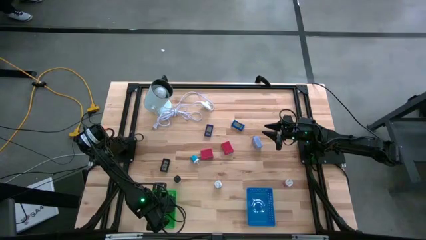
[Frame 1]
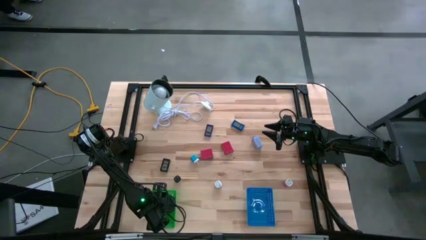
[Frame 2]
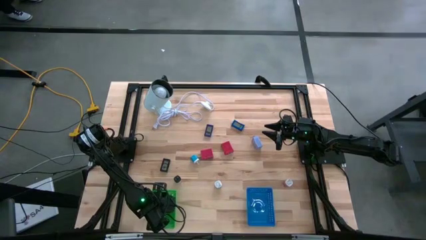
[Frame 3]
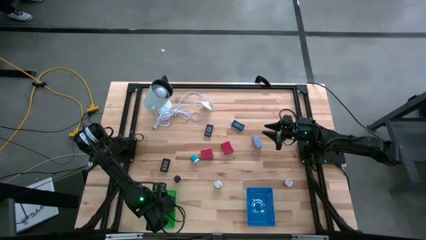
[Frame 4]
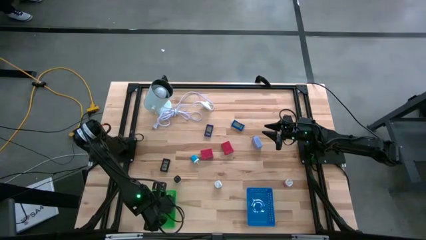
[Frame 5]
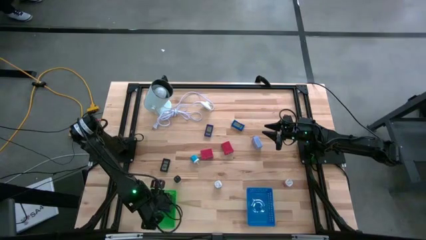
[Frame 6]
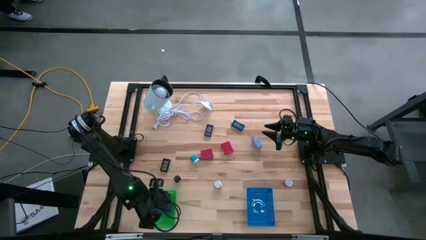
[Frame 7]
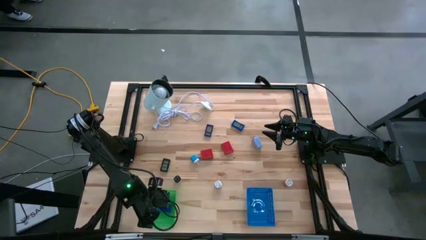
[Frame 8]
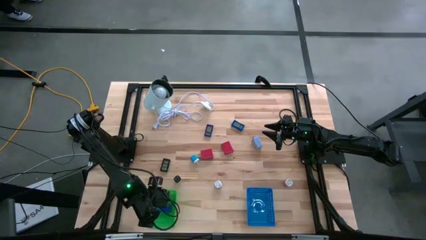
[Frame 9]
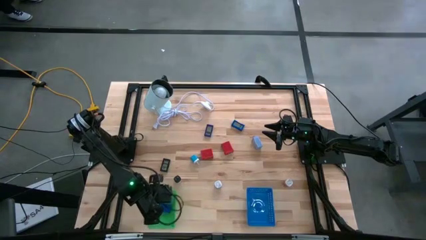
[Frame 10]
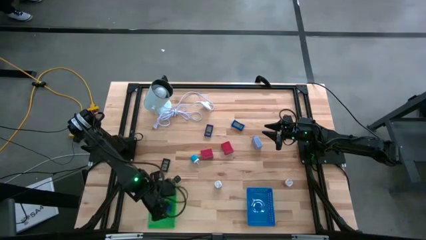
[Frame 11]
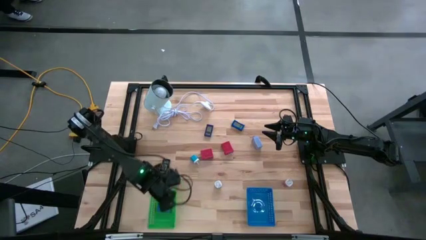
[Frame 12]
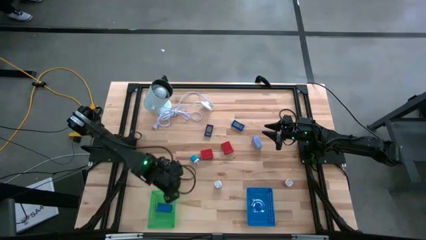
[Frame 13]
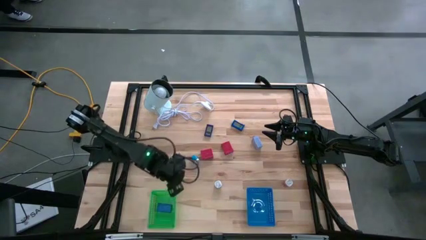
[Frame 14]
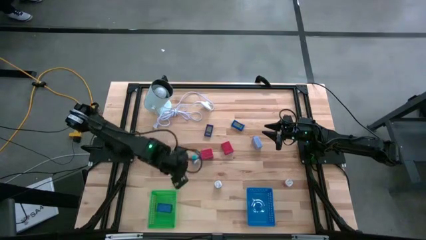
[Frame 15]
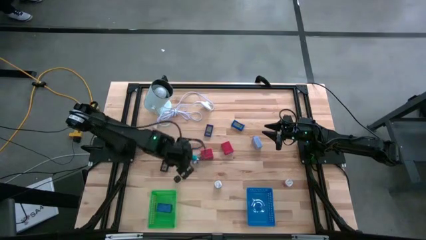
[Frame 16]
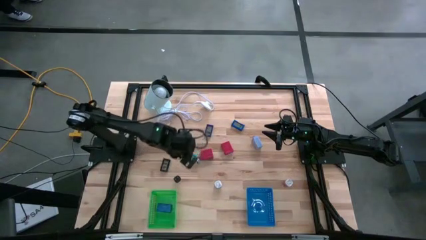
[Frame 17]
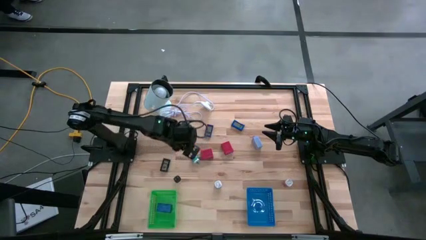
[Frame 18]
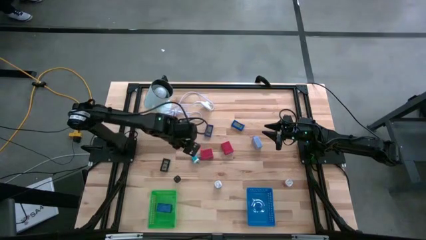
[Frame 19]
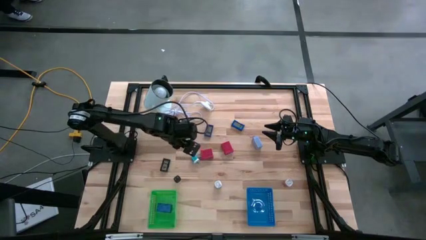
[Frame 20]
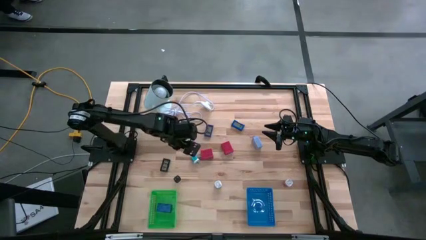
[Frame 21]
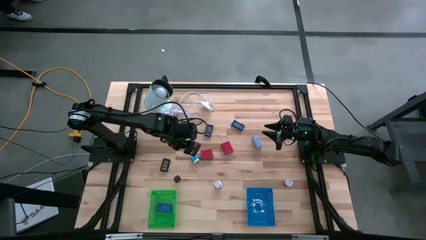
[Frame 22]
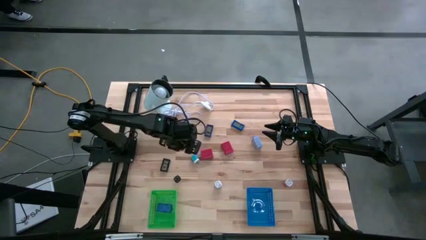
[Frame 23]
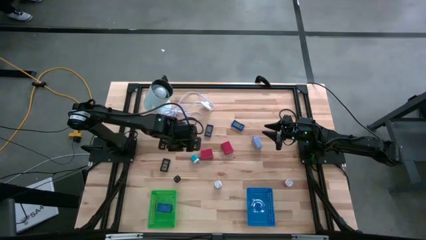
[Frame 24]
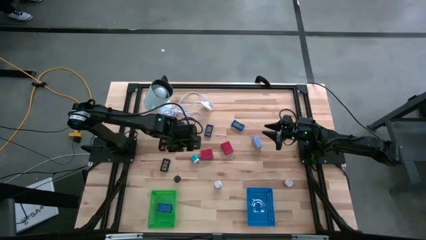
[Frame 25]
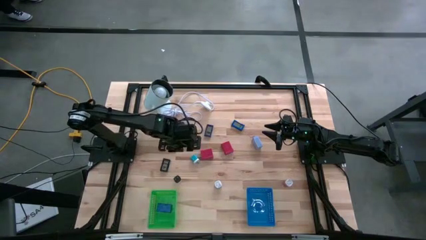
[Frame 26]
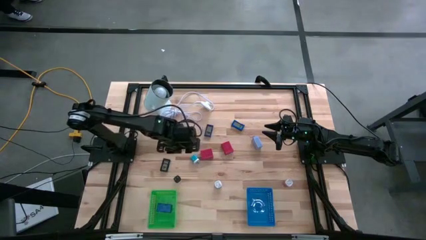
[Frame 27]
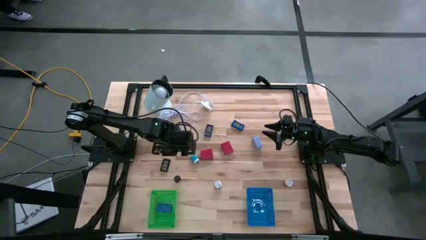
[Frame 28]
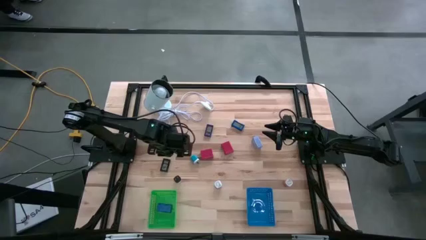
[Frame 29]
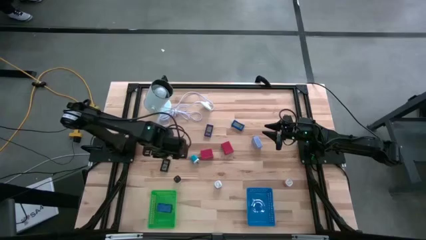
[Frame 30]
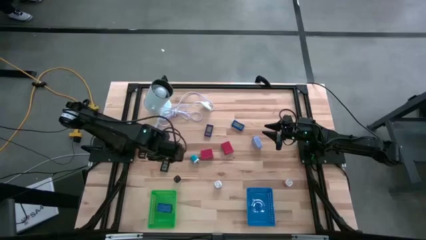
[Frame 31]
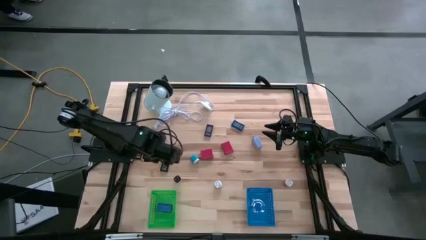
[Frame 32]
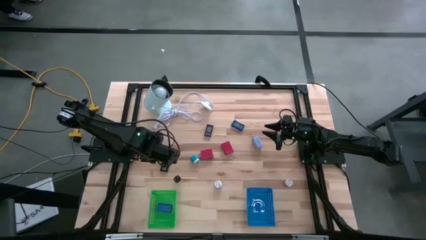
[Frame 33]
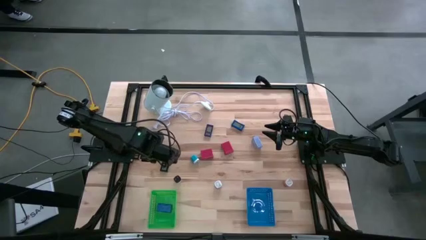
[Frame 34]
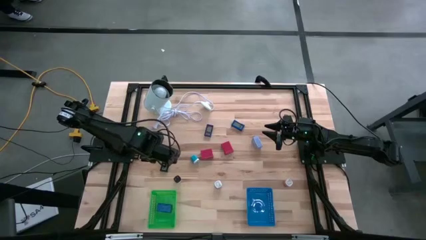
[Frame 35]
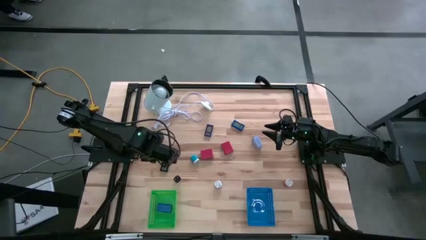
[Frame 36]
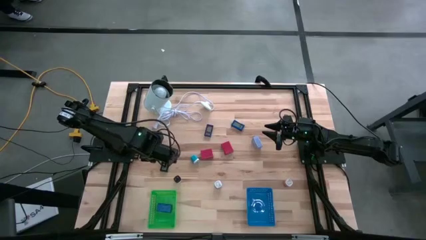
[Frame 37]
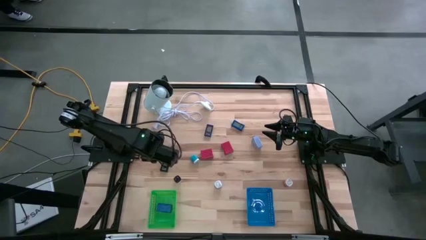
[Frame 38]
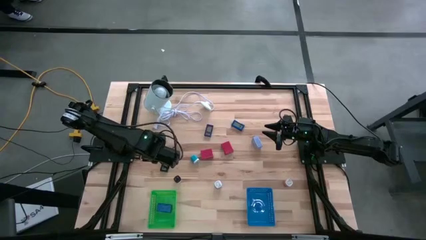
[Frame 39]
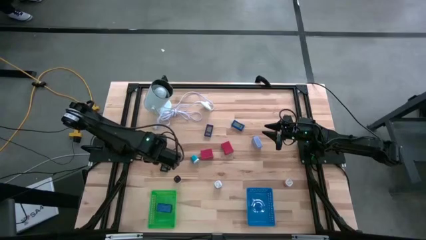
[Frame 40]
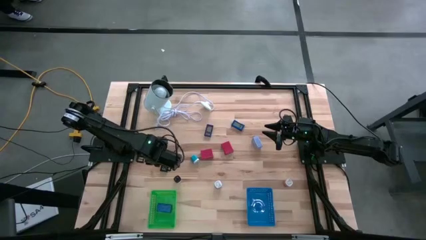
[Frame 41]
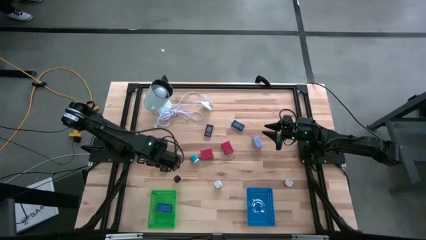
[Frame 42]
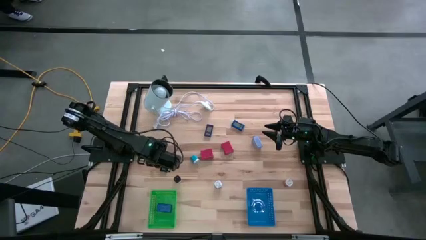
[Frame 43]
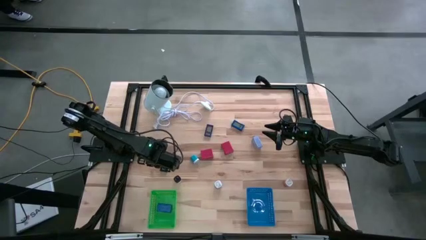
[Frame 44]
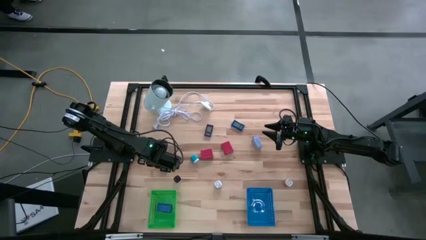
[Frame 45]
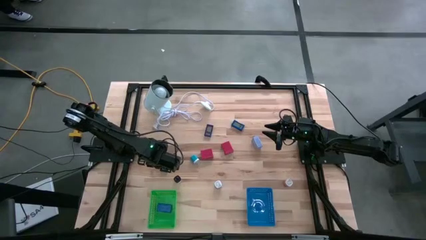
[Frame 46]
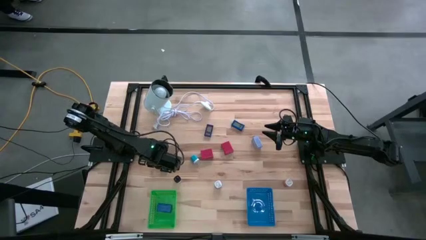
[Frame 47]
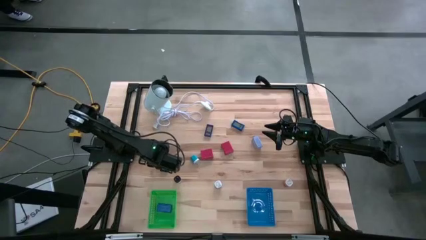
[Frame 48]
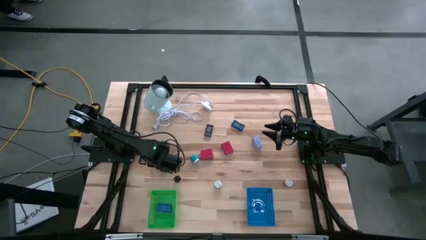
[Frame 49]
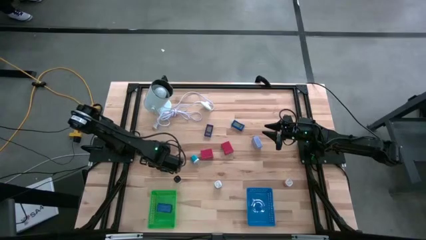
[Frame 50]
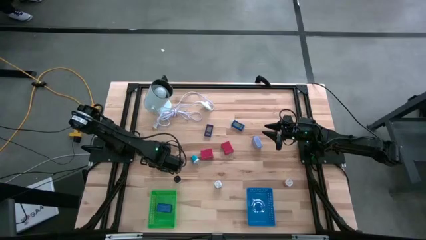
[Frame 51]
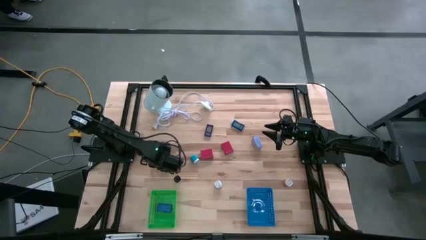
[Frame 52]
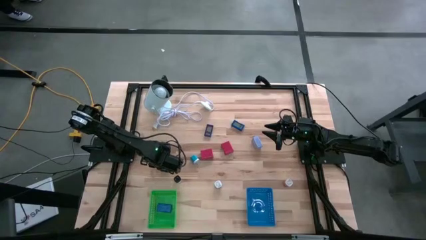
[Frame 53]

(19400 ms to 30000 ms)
Task: Pick & Place Office items
Put the black digital clock into the green bin

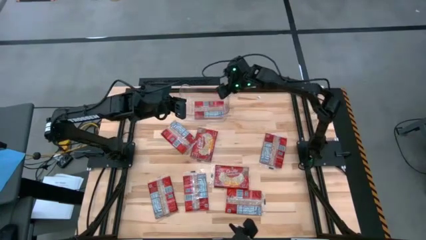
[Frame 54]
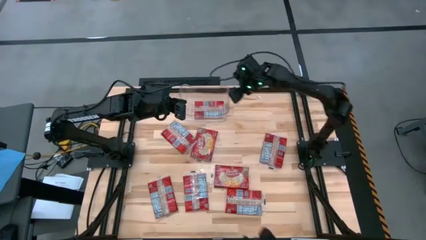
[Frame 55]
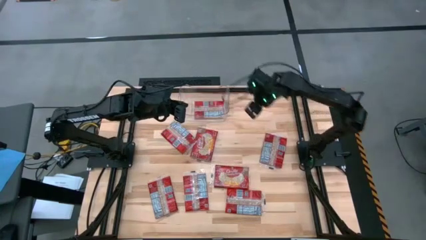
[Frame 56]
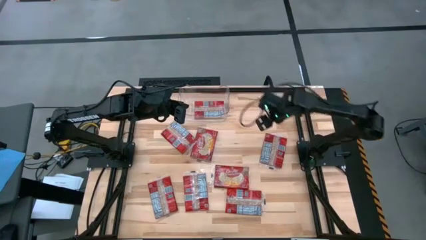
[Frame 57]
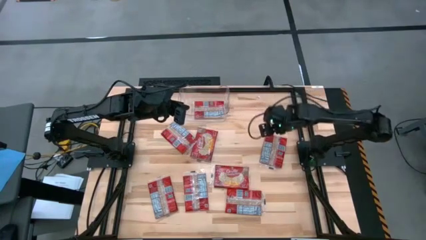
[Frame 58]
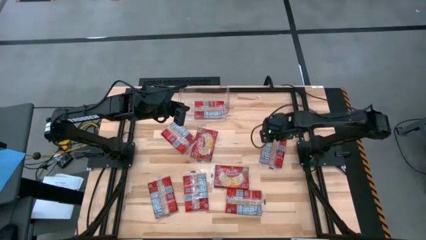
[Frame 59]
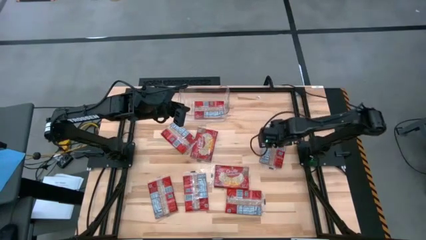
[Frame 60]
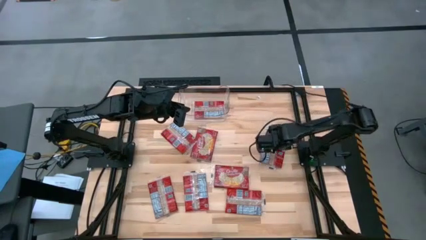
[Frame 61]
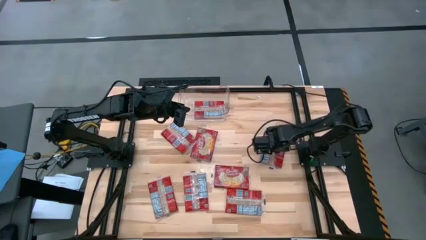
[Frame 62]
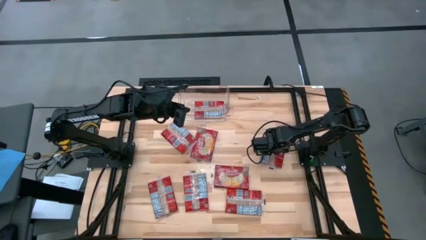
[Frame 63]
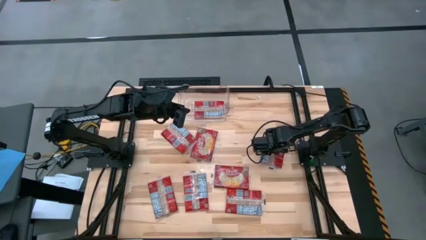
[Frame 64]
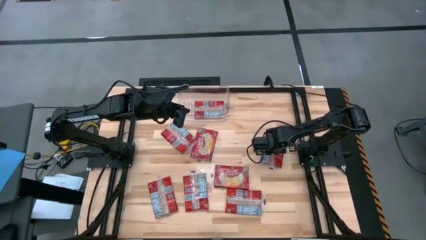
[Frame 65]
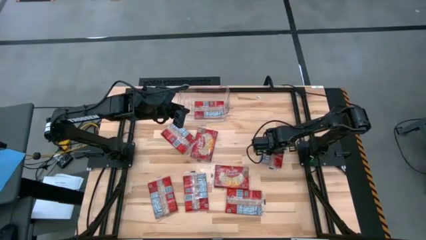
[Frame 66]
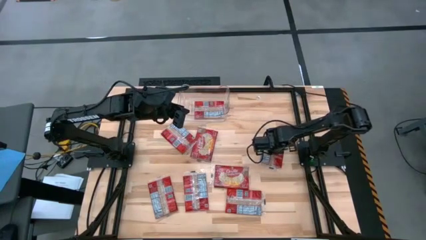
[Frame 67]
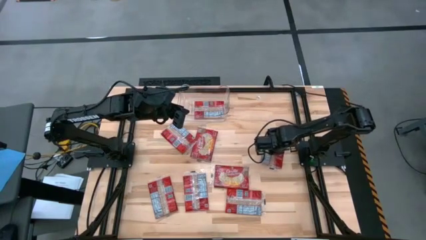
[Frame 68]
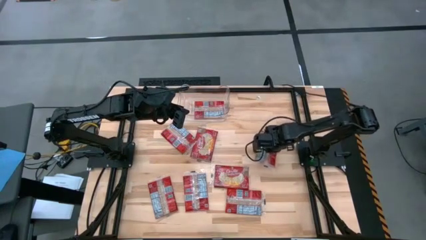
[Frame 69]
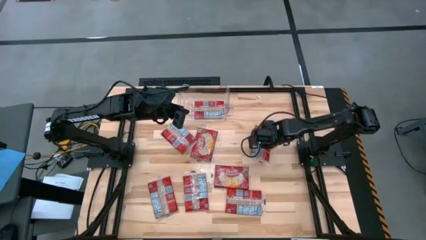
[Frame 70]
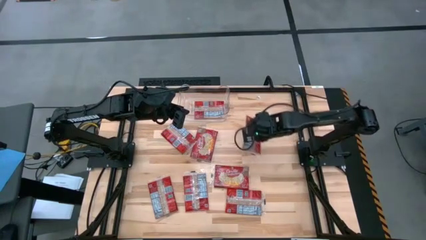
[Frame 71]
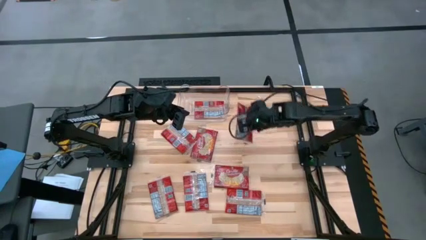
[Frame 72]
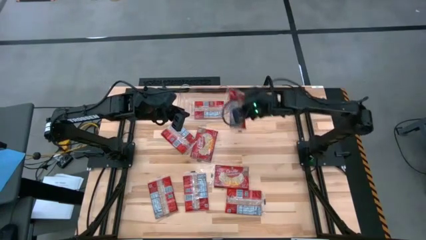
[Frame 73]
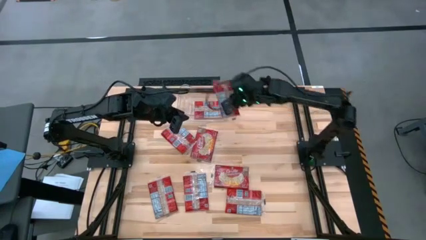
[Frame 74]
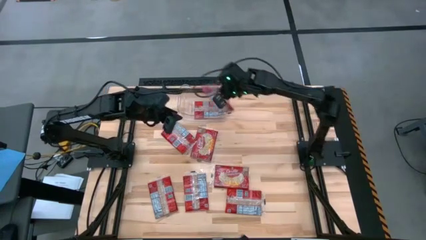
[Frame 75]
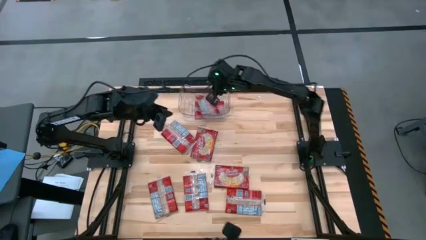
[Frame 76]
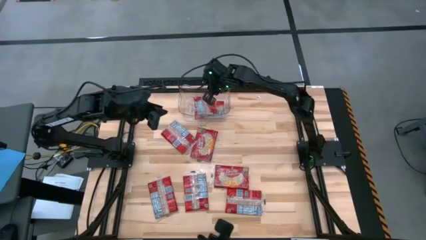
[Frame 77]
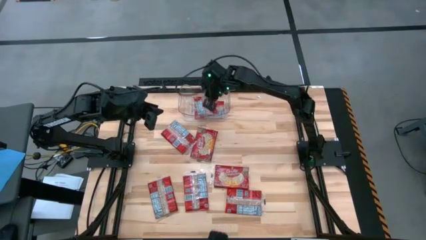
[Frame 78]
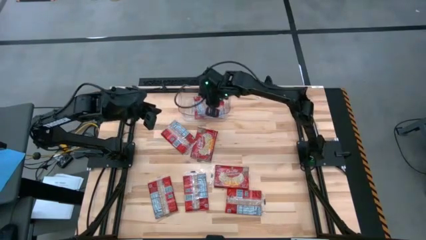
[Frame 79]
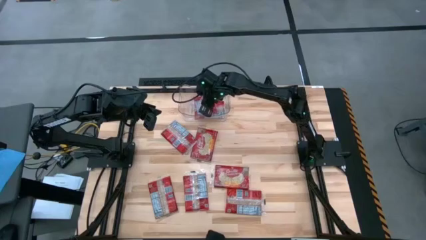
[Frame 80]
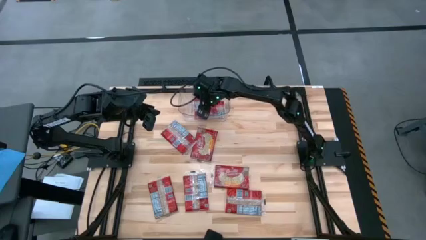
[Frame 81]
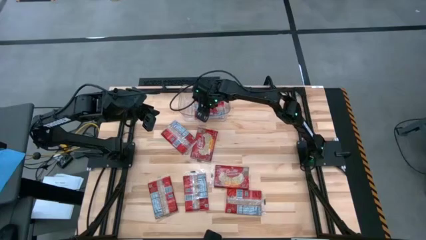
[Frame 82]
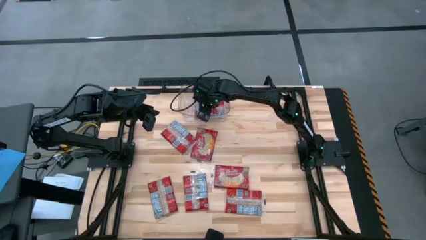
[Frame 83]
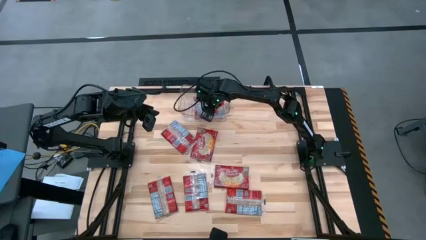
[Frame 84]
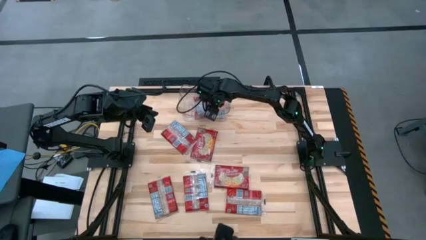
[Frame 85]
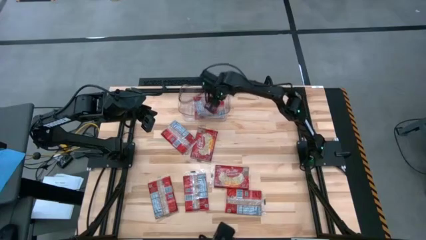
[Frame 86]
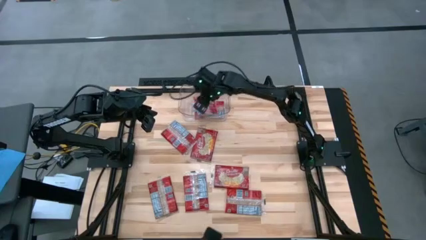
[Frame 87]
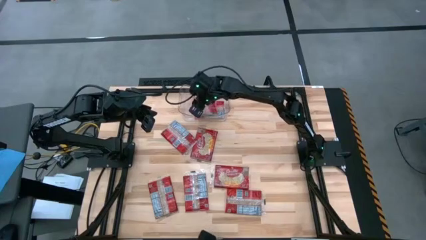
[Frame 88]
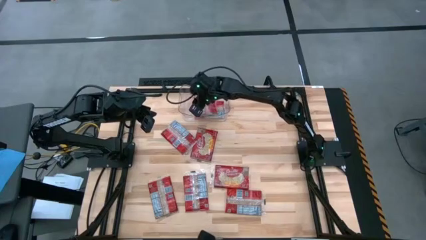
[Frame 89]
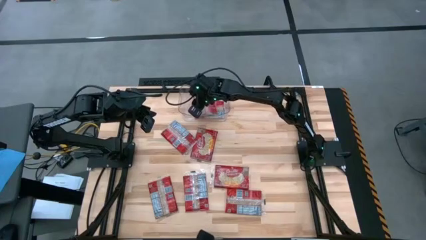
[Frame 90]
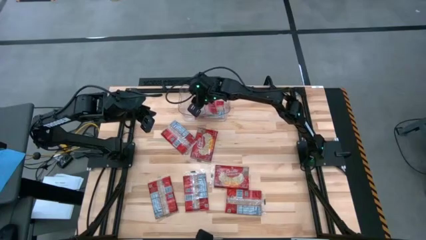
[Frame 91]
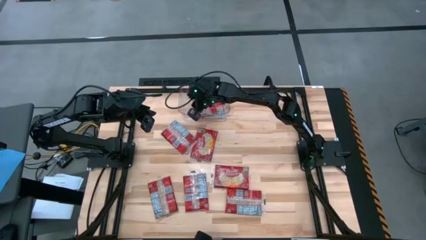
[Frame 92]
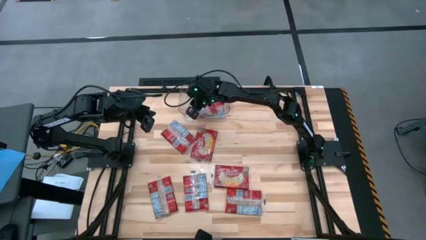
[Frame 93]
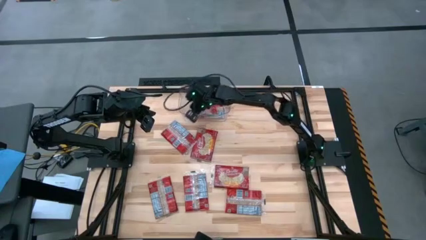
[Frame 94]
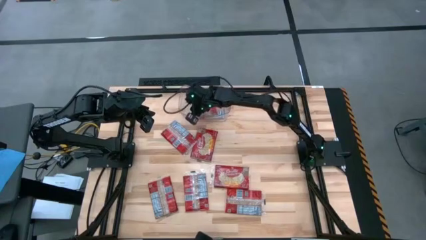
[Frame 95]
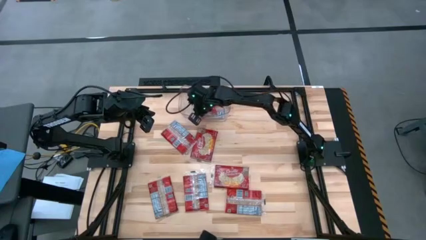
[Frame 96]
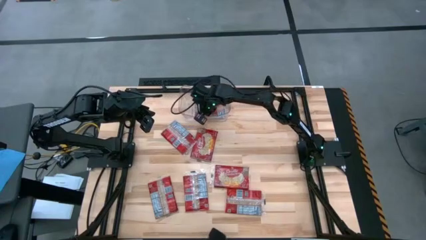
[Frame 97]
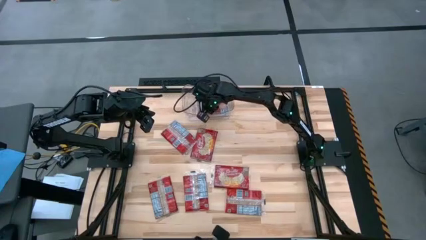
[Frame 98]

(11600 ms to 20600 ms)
Task: Sort popcorn bags into baskets
Put the red popcorn pack into the transparent bin
